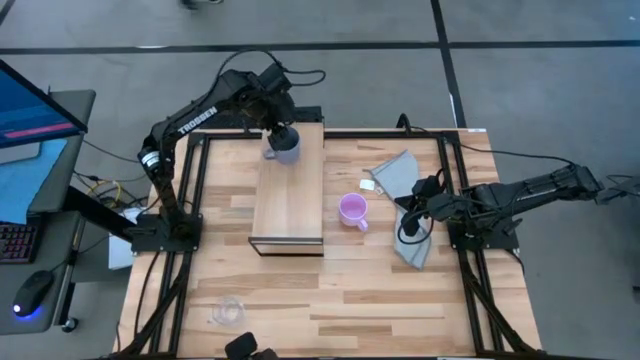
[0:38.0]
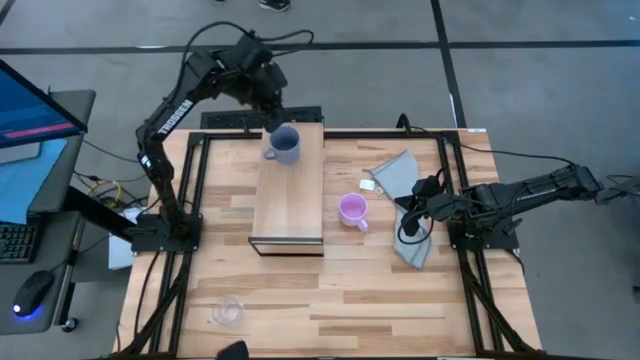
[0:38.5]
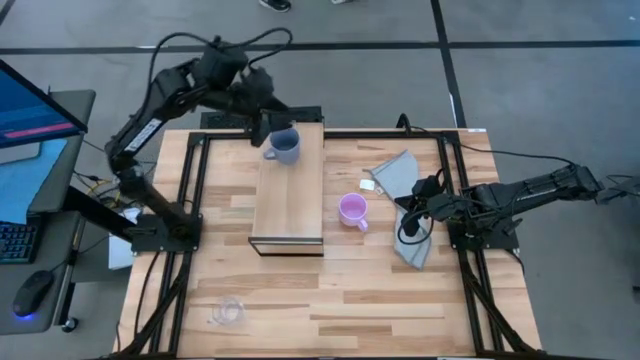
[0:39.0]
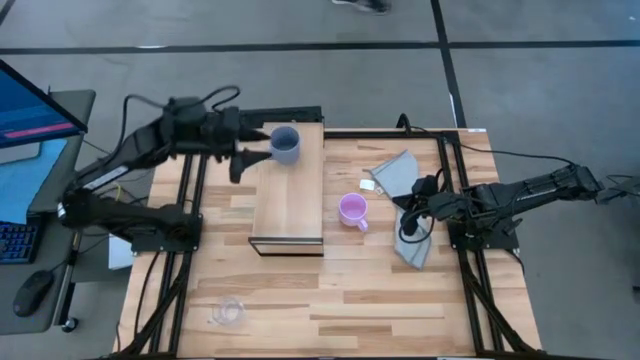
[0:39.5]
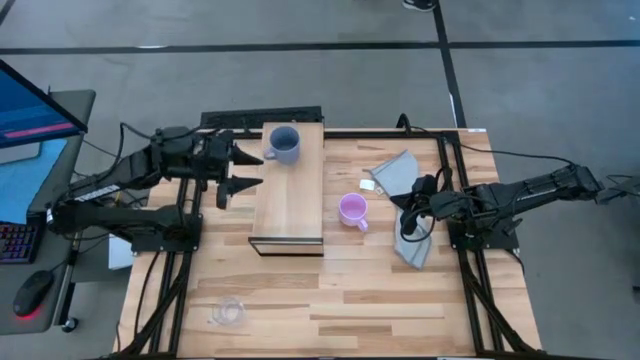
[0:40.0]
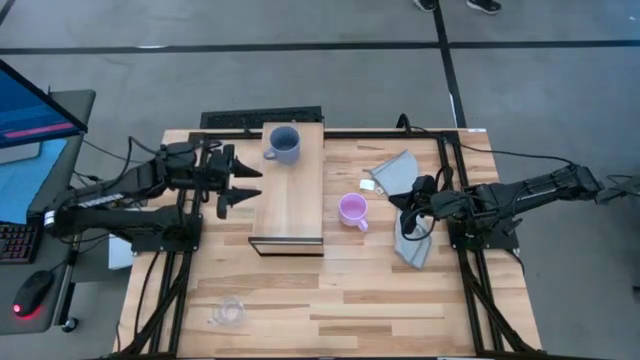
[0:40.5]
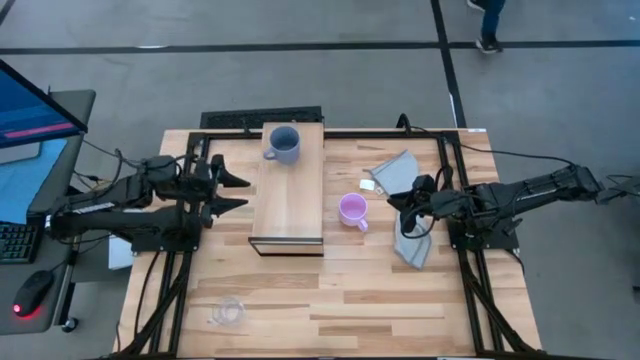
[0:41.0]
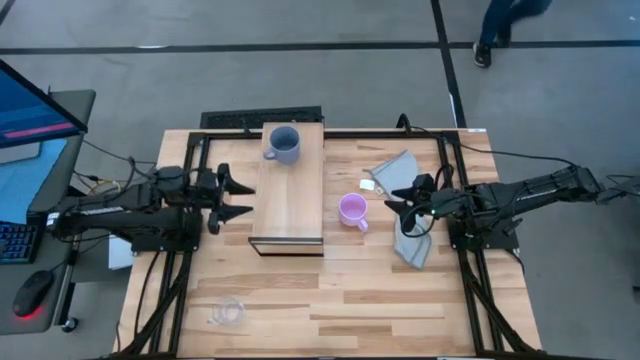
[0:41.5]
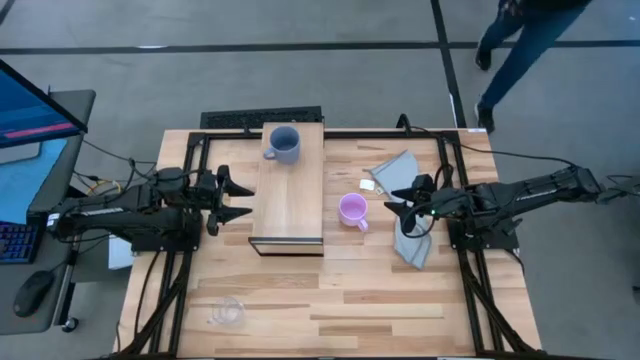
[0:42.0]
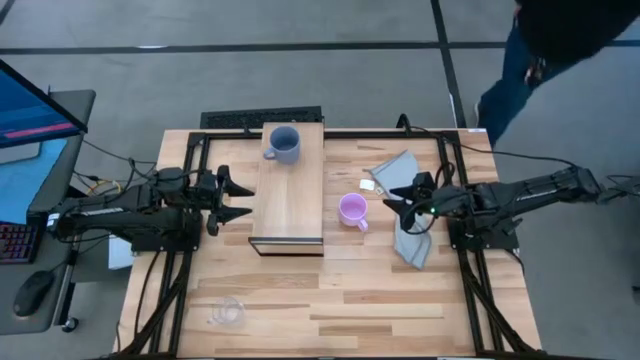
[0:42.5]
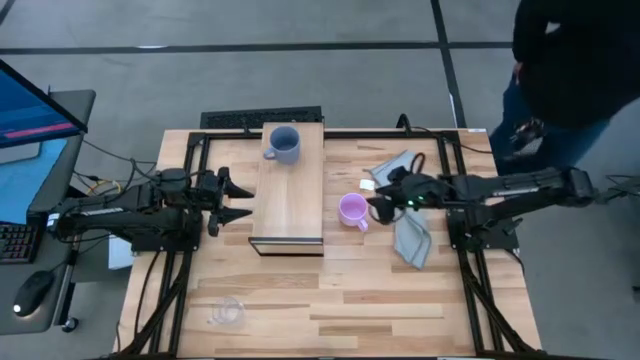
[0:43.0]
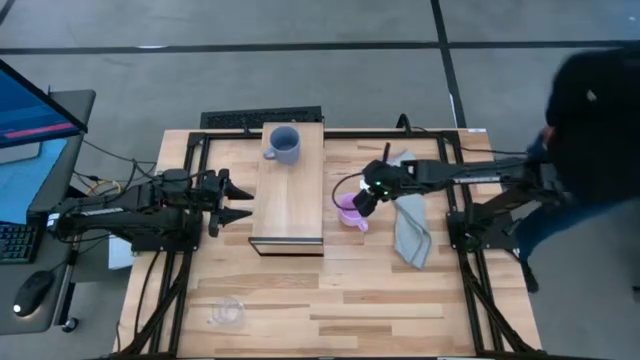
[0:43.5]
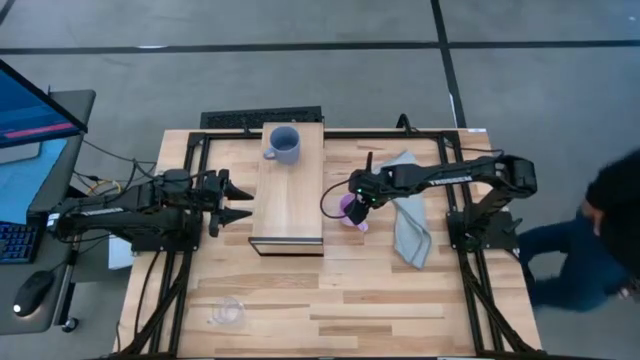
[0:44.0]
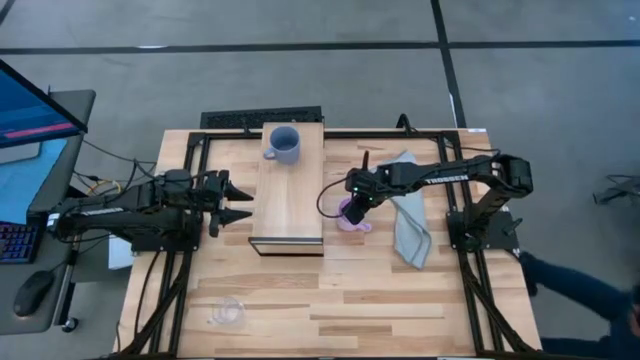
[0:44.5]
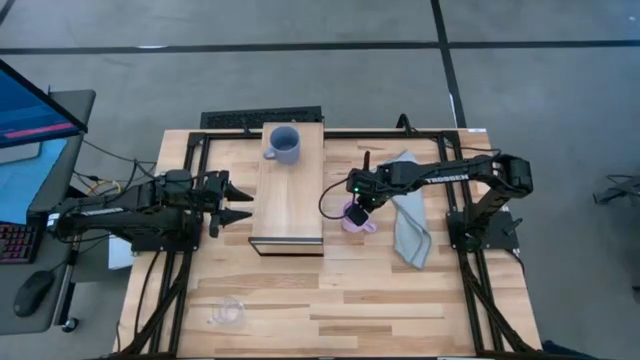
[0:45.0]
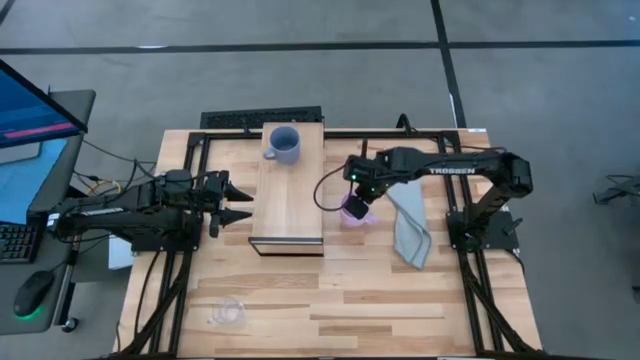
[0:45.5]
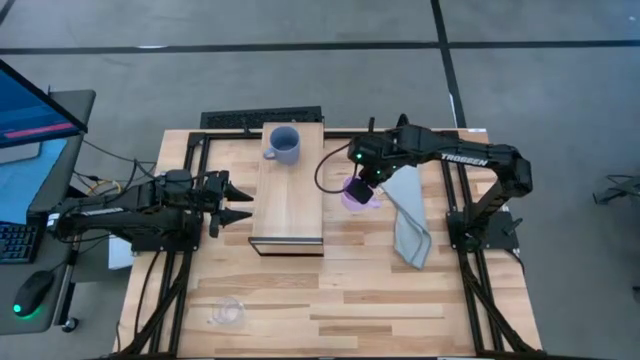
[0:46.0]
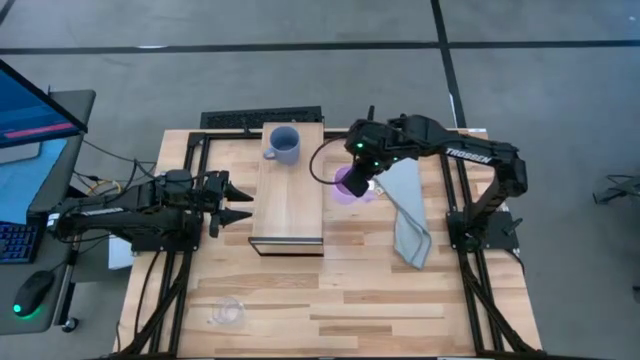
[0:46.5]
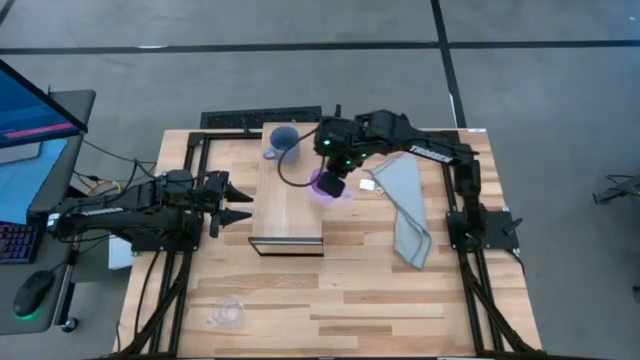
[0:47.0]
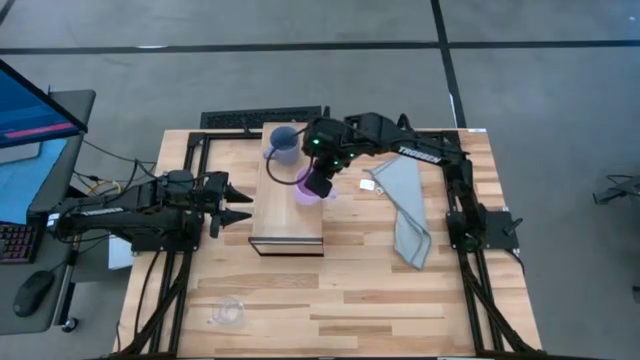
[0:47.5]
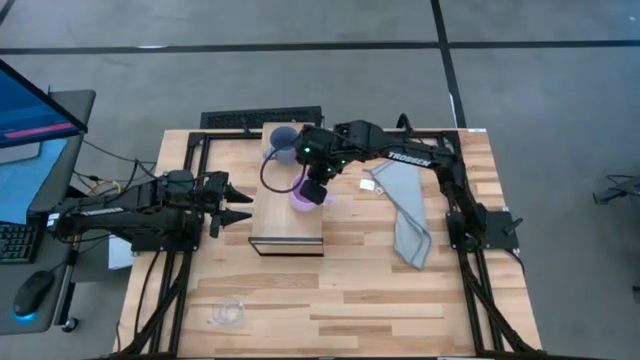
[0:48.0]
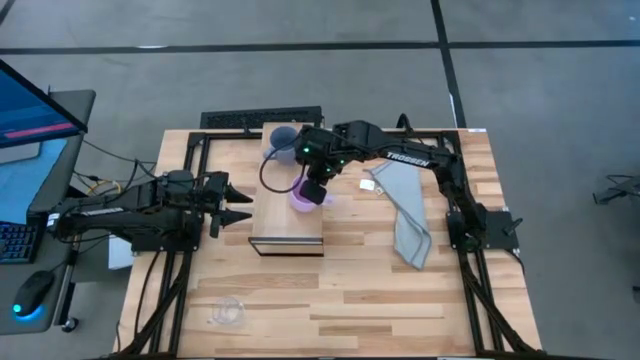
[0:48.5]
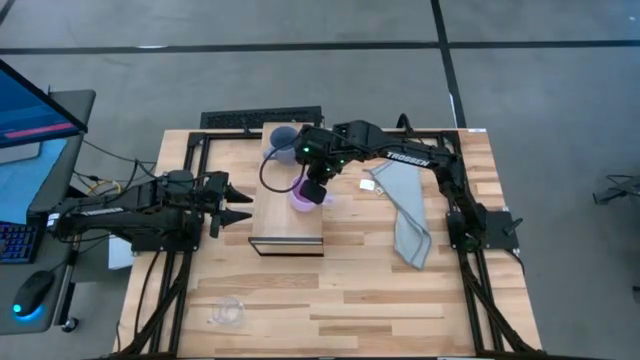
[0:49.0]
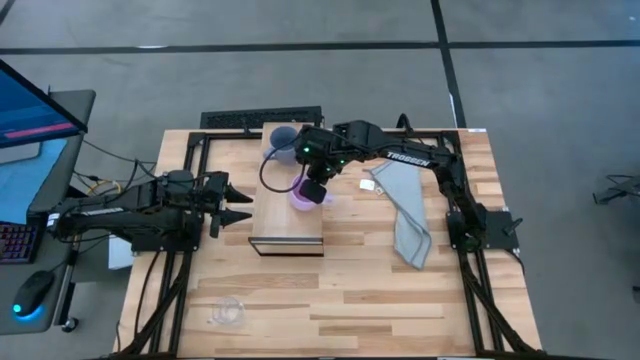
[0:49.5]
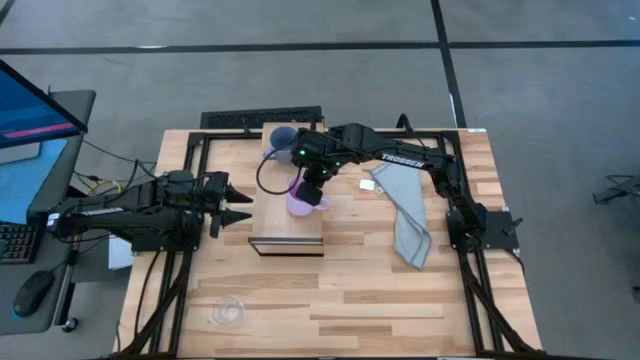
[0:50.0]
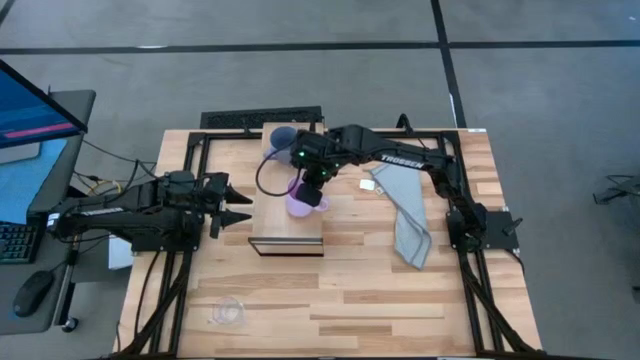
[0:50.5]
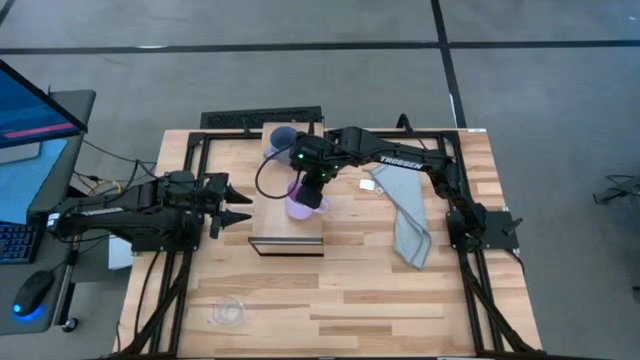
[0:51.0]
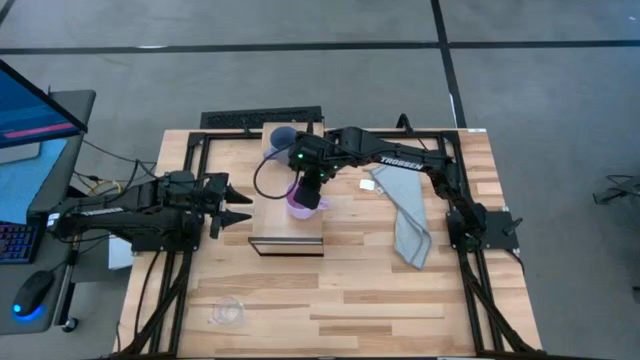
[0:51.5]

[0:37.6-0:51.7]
Task: Stack small to large cups/mugs on shelf
Put the pink mug on the shelf

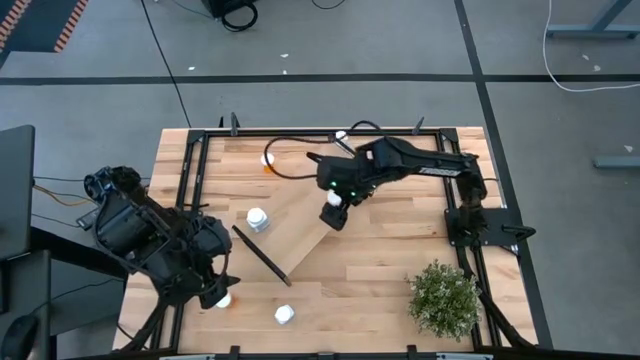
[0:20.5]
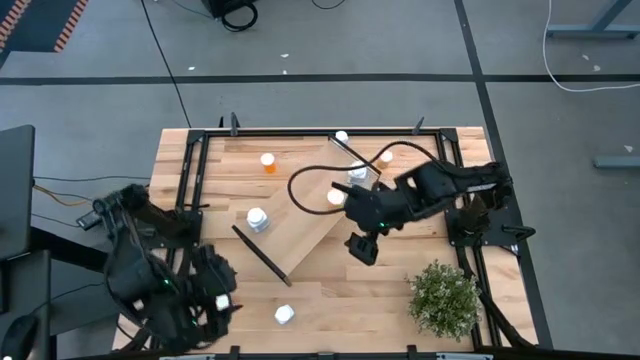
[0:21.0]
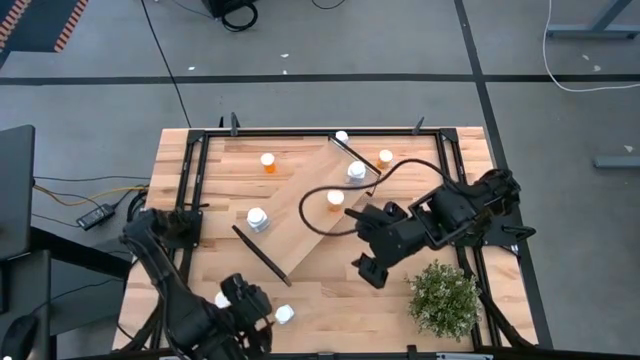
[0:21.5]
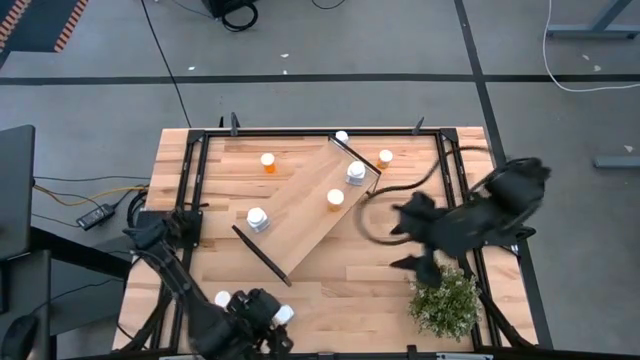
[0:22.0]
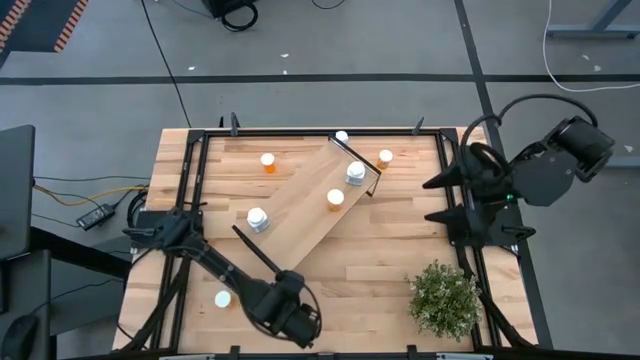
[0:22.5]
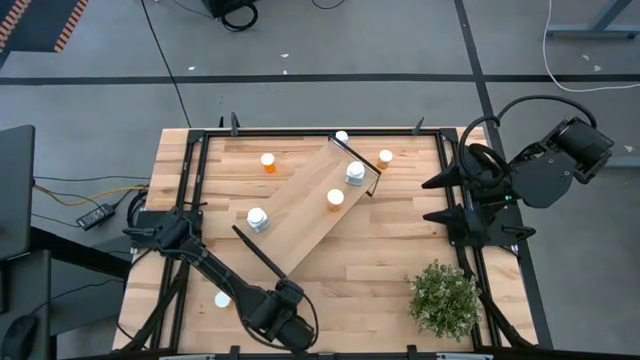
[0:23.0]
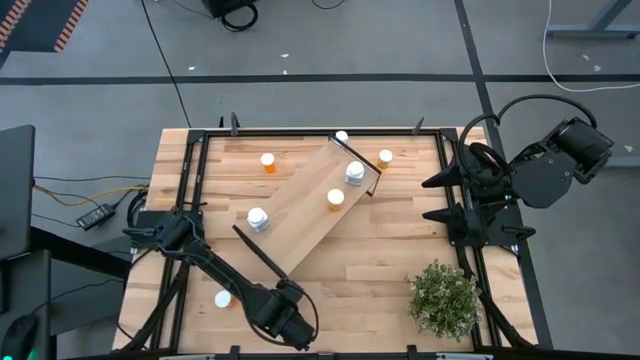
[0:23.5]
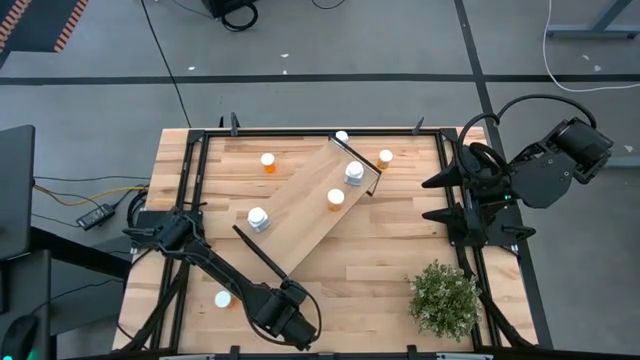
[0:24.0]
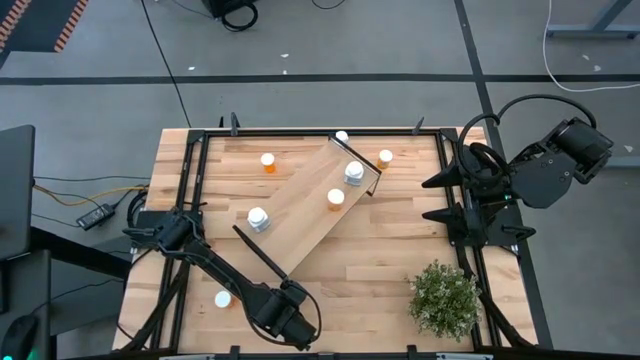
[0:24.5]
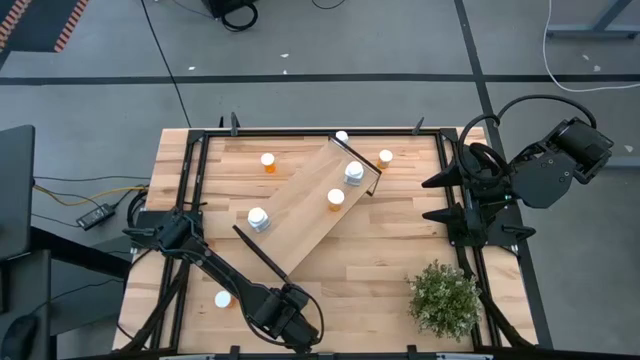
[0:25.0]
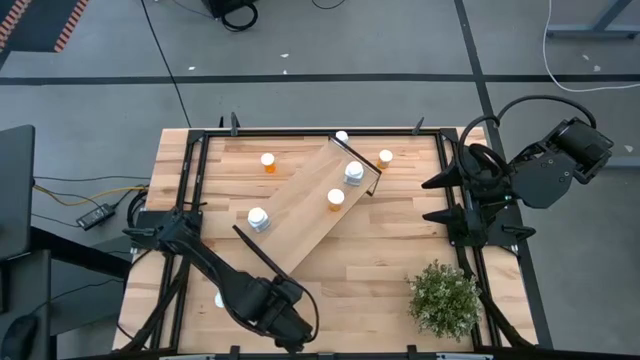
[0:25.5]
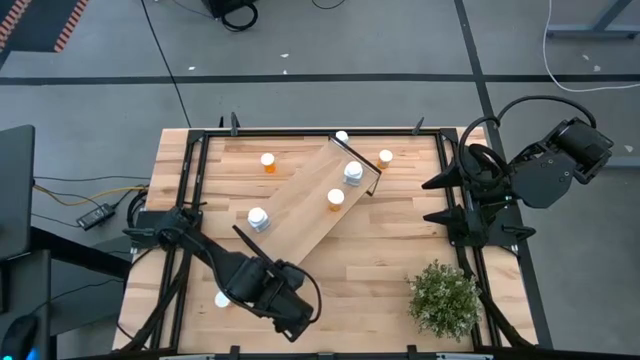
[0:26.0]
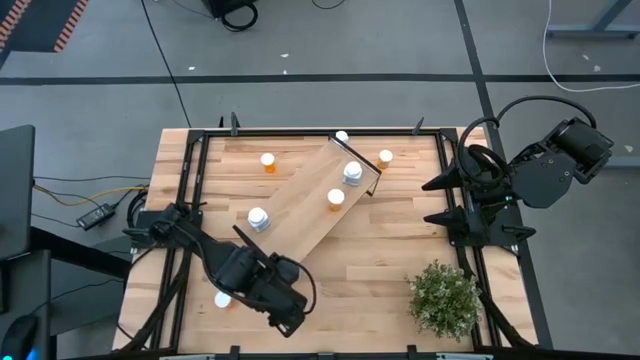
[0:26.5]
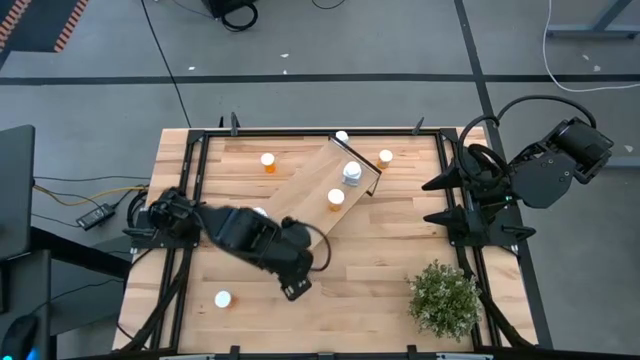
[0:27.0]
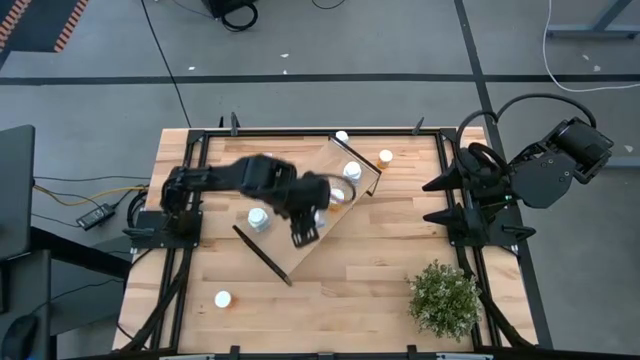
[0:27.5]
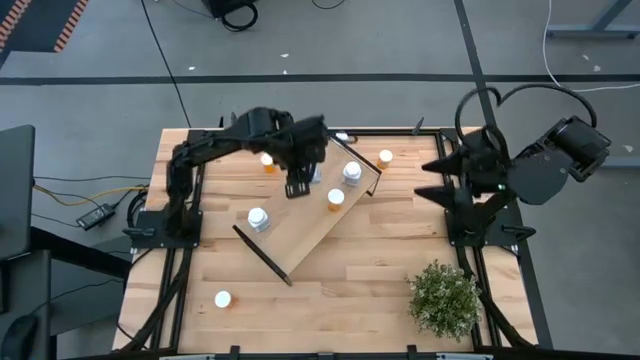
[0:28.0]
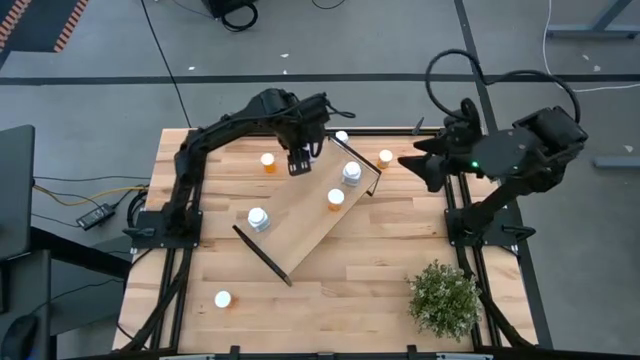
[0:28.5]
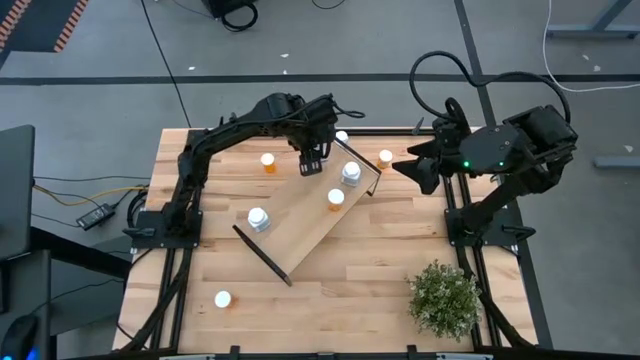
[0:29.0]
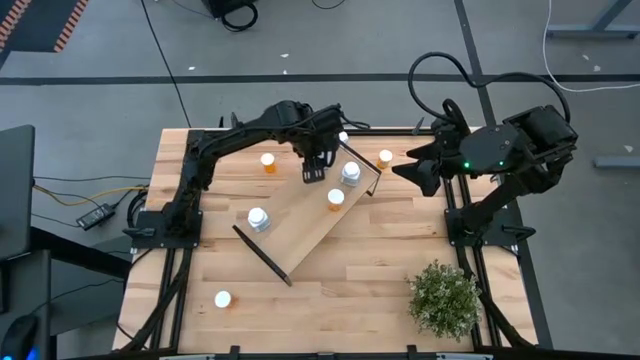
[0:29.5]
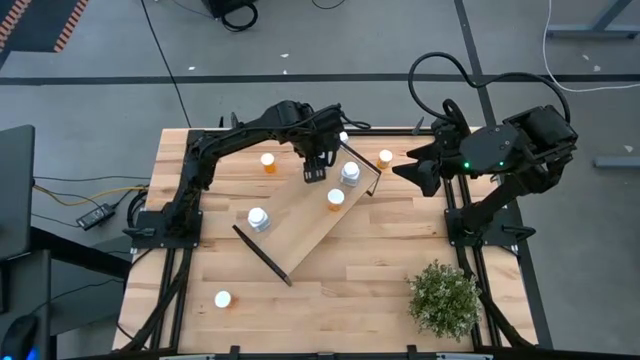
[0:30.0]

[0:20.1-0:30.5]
Task: Pick and place medicine bottles onto shelf by color
Put the pill bottle on the shelf
